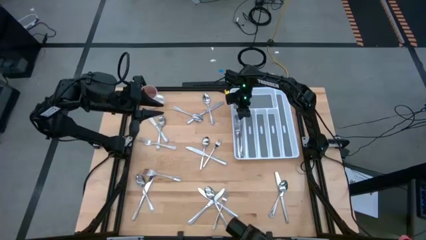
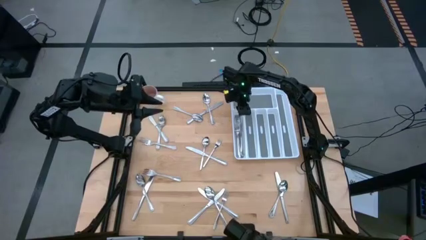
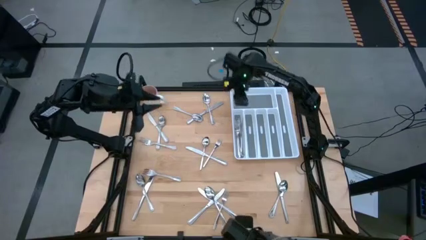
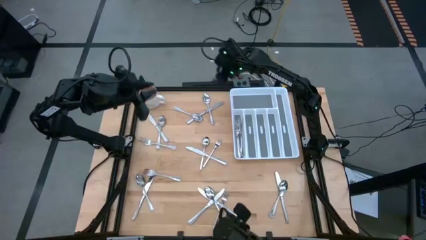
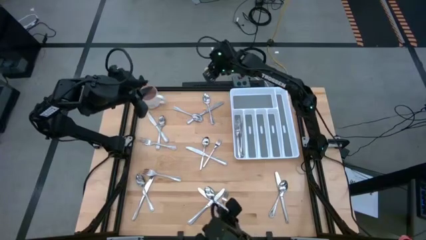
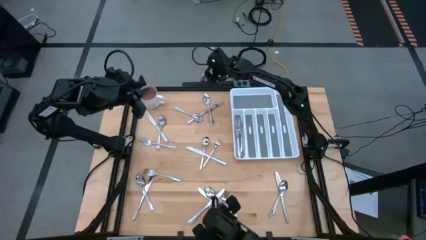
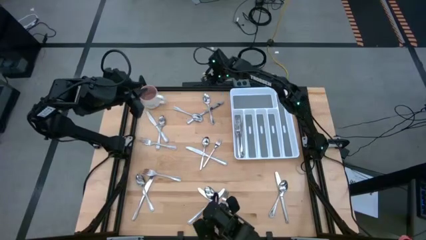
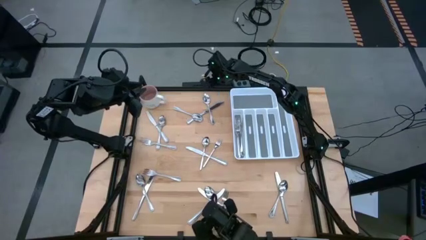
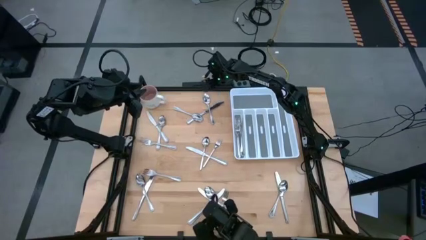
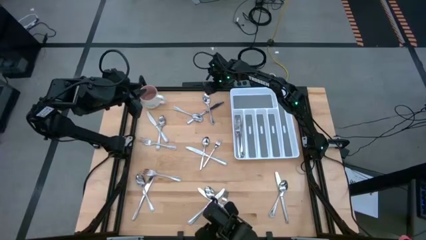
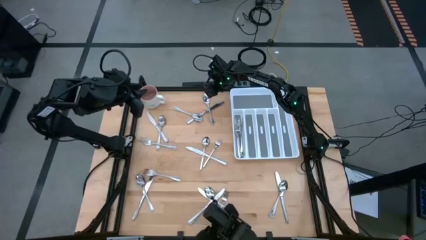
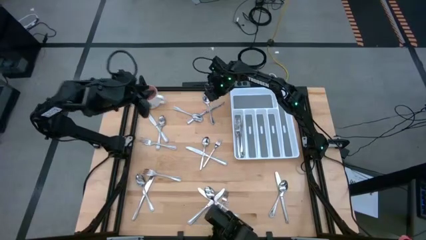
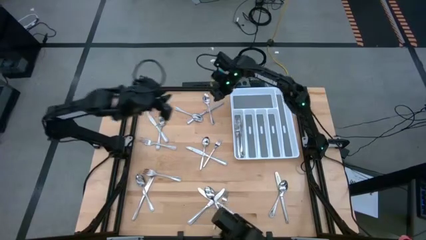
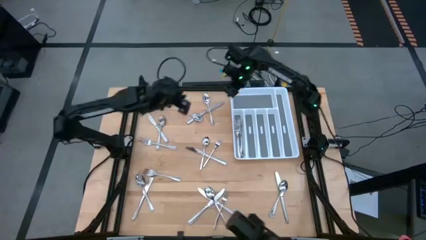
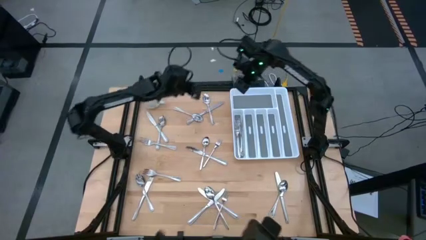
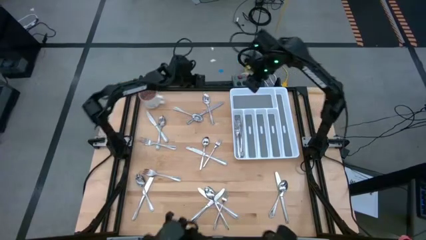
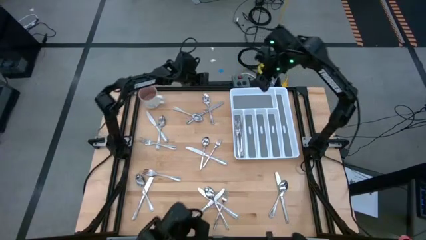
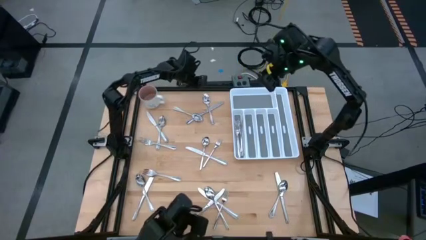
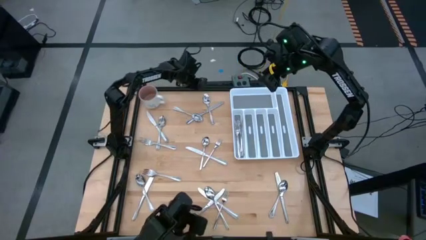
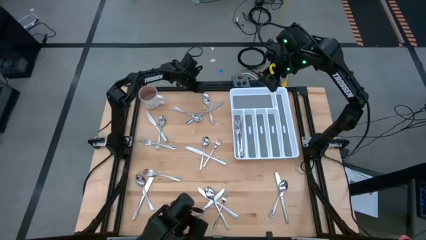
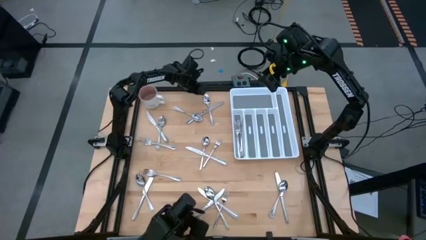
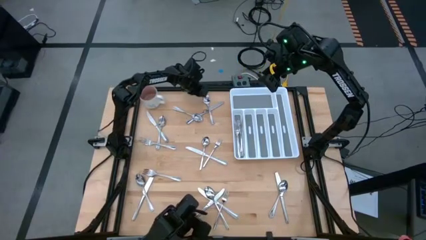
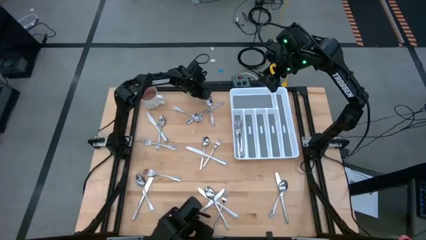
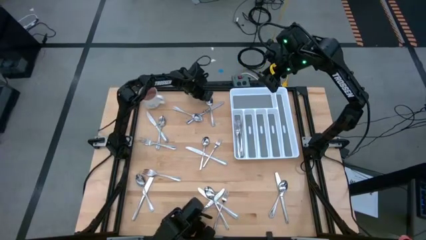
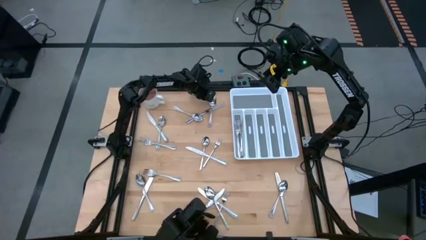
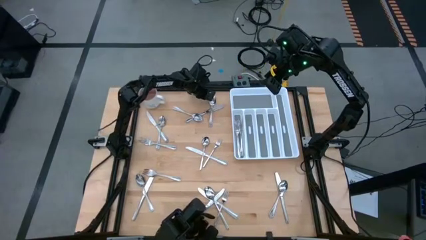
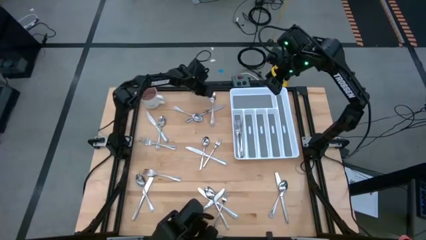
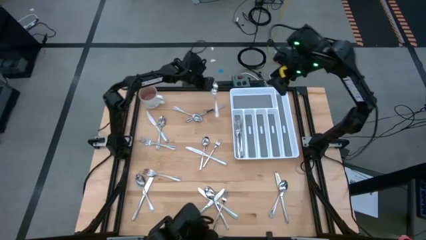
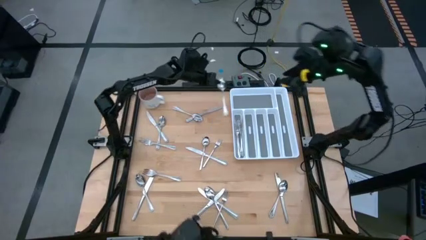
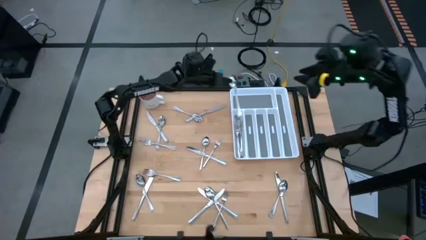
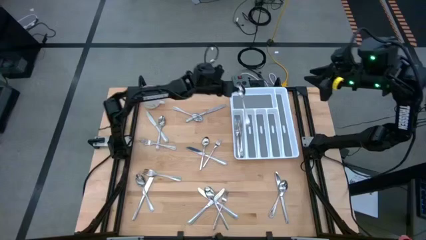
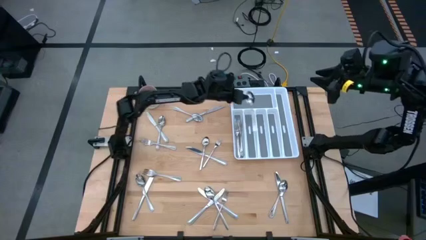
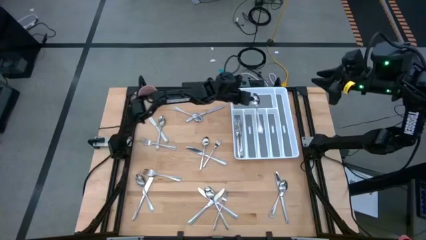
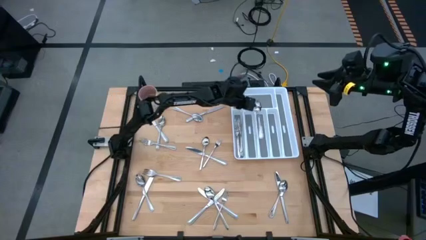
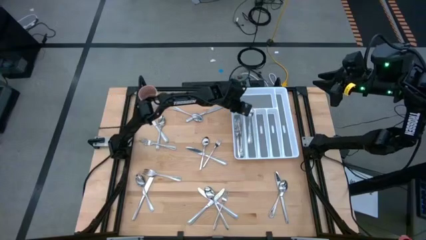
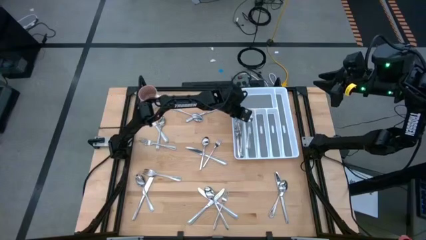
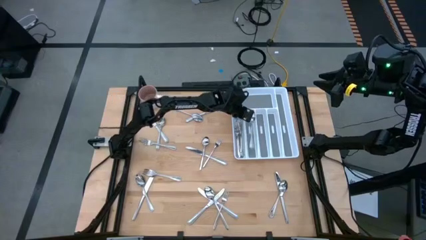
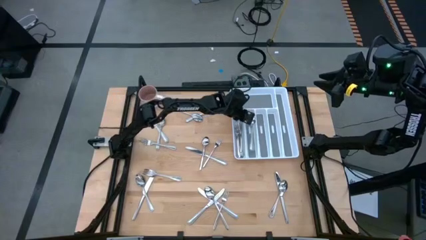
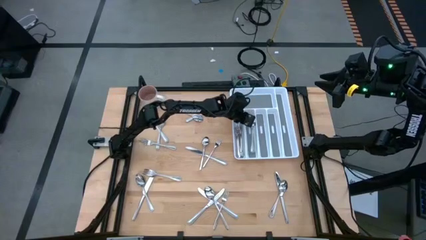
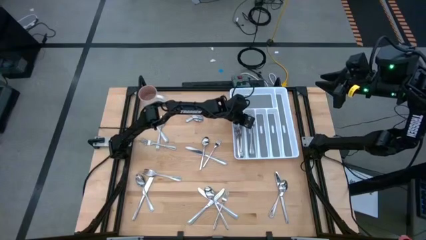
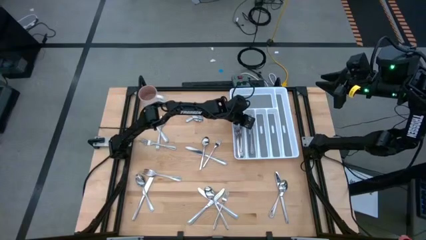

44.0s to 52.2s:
Task: Sort silverware
Put the silver spoon into the silverware tray

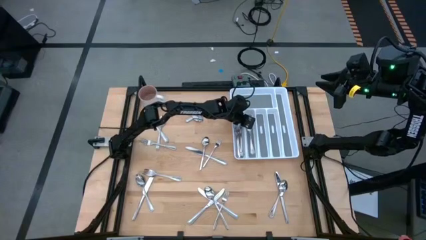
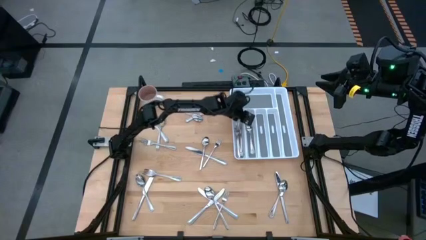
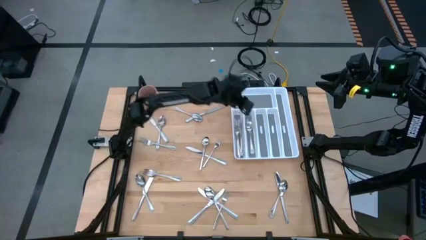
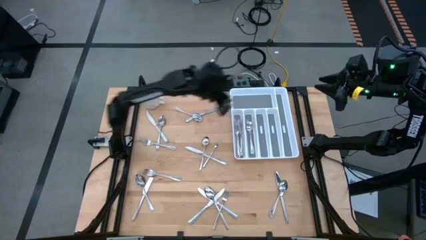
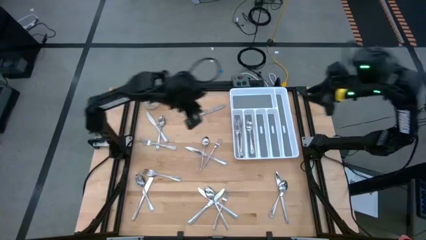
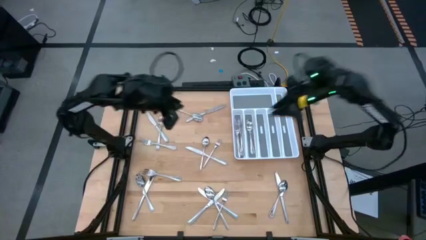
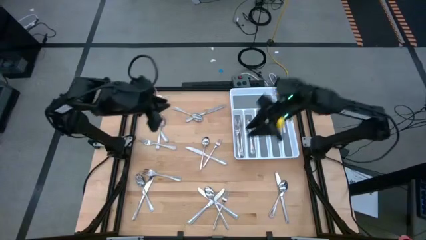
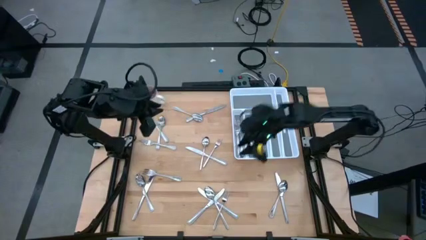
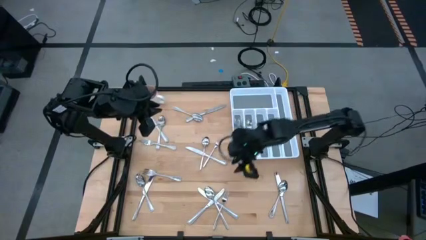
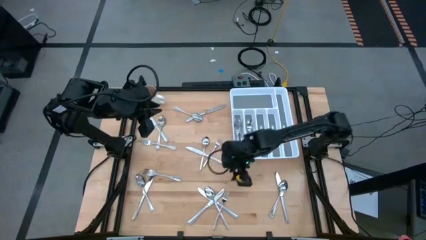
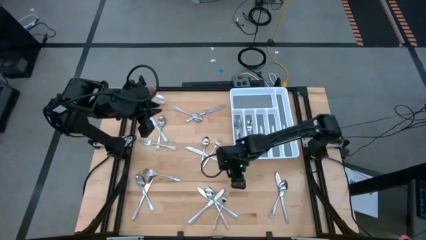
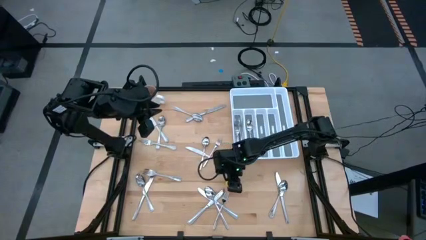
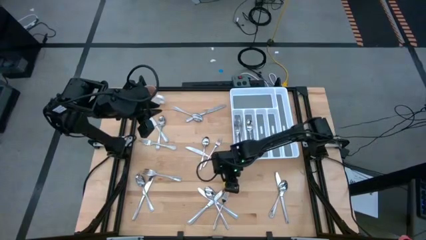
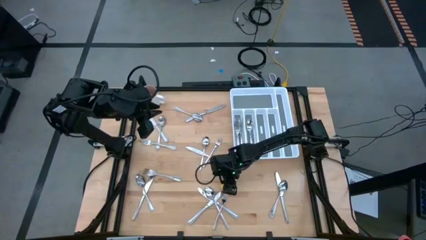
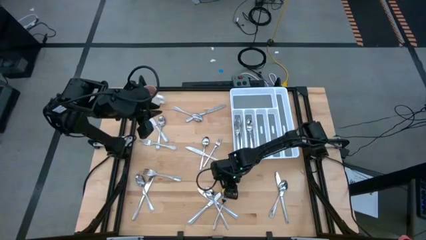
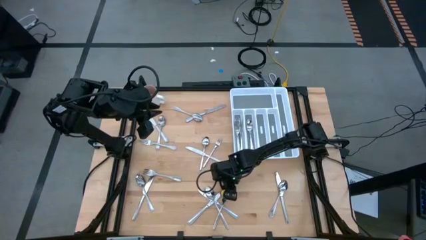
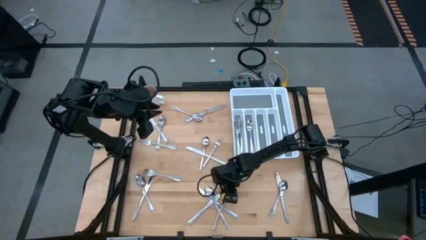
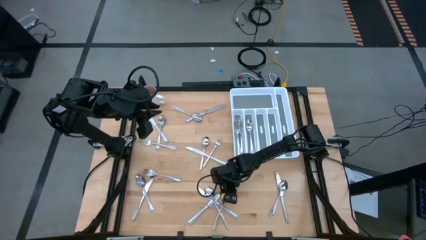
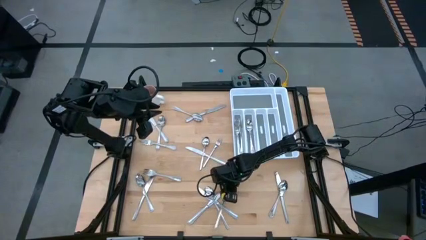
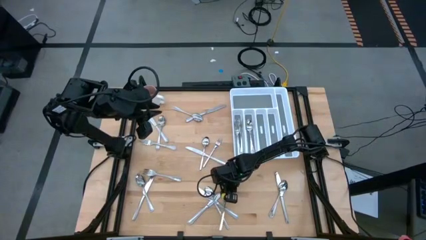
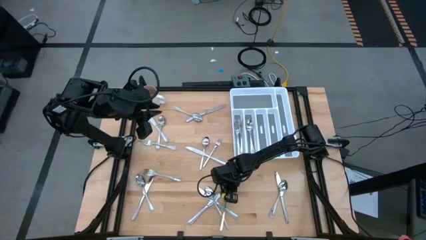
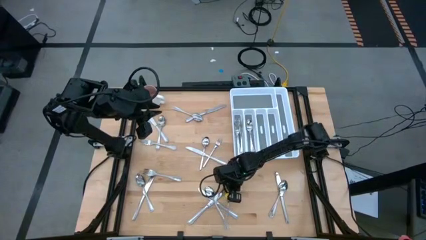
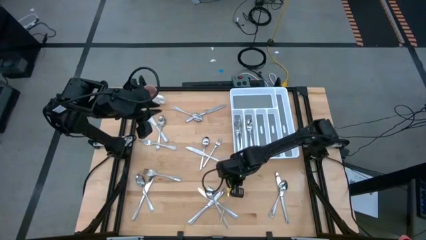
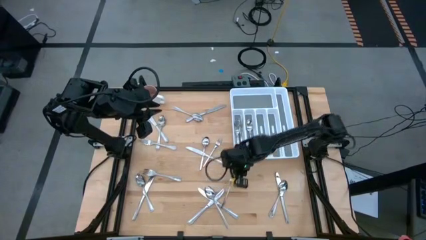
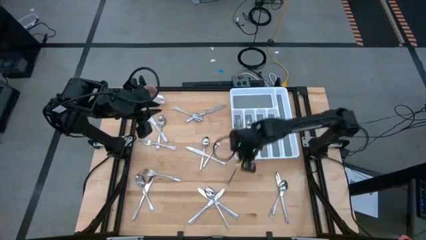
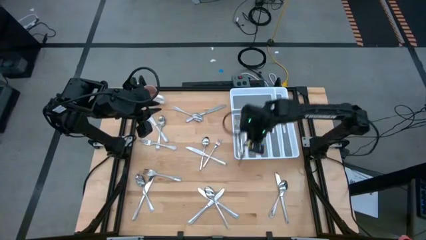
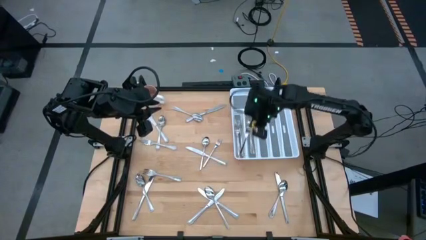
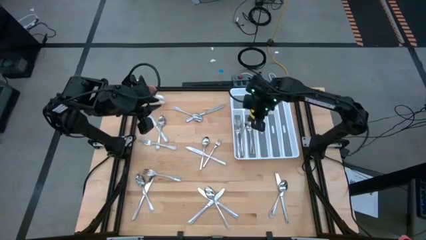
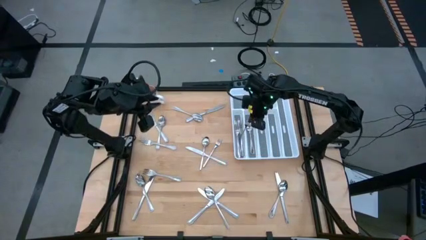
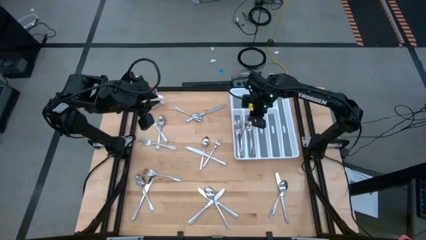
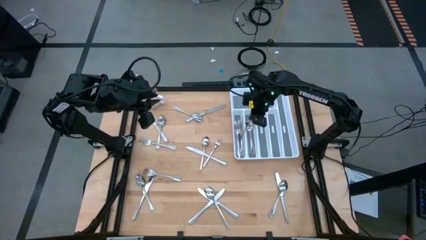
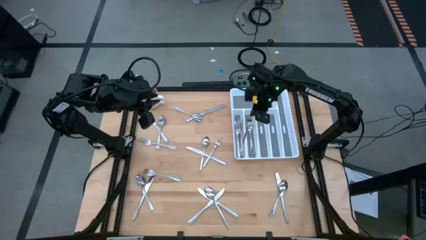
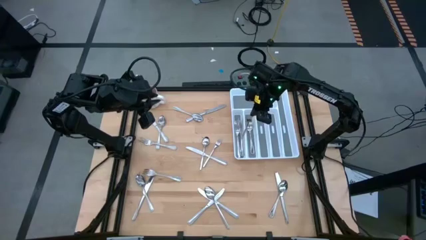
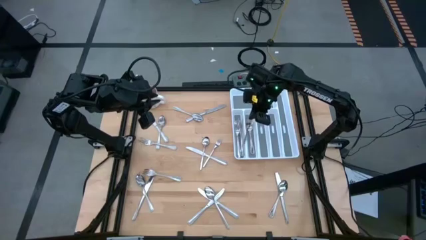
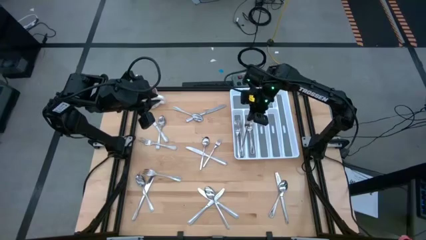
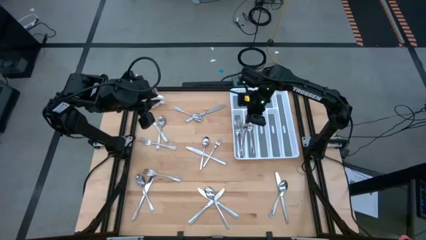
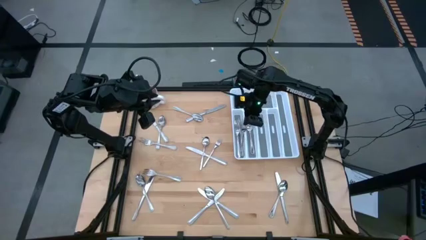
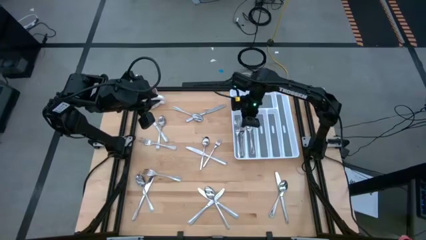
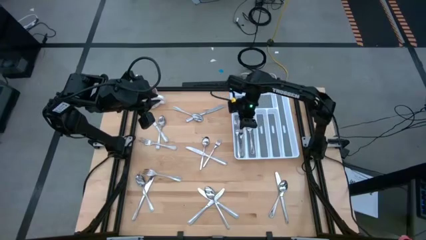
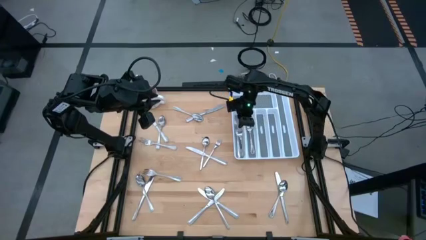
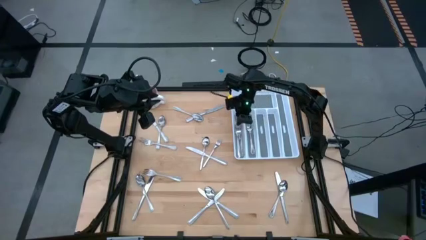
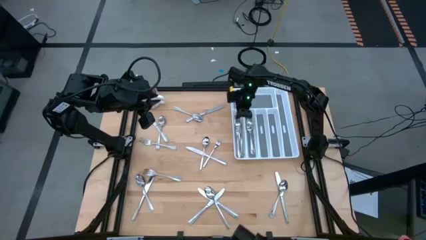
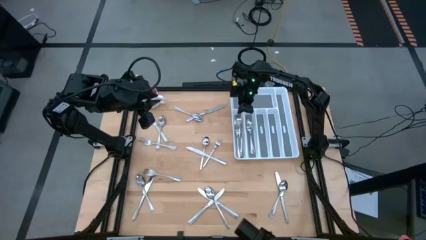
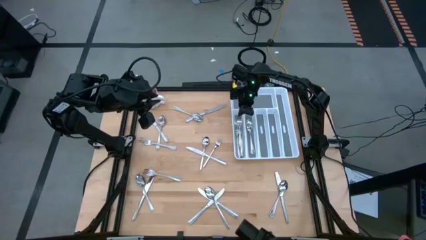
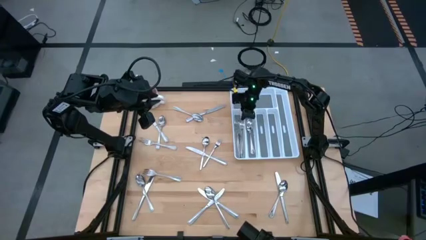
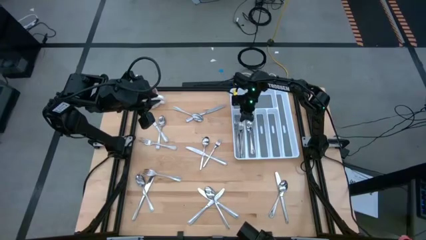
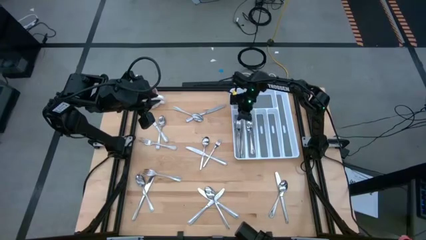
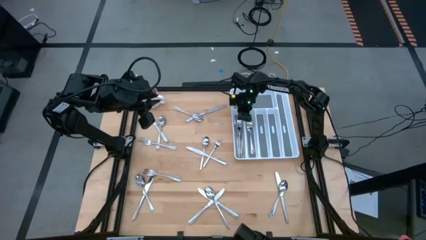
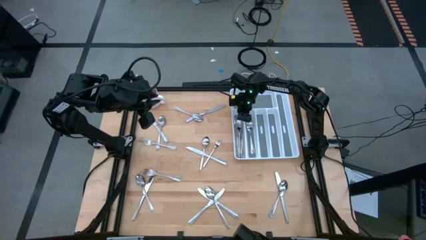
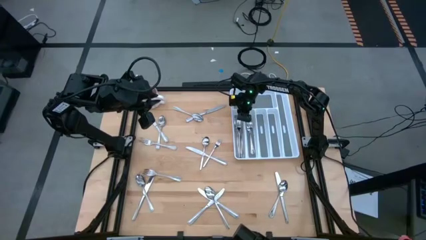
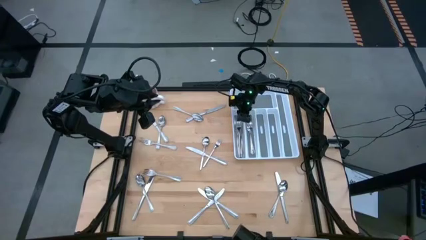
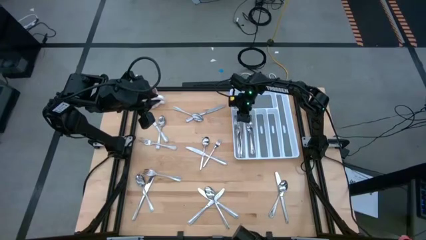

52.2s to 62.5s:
Put the silver fork into the silverware tray
